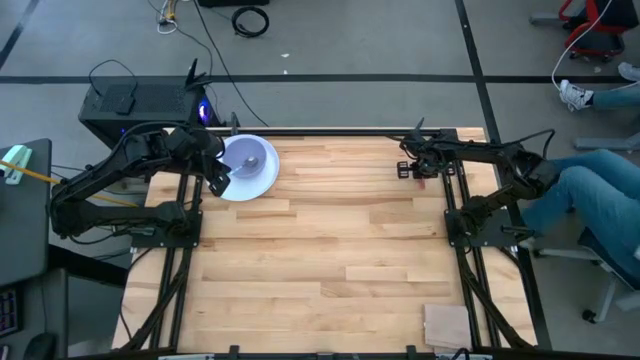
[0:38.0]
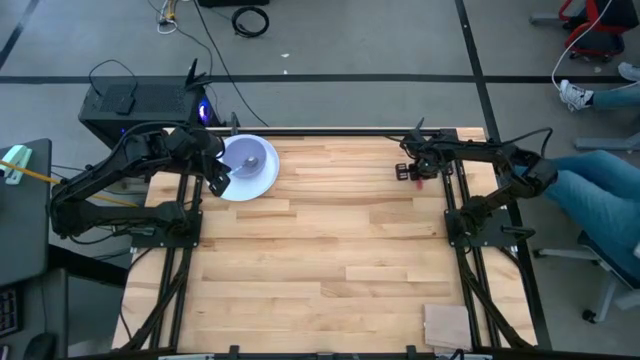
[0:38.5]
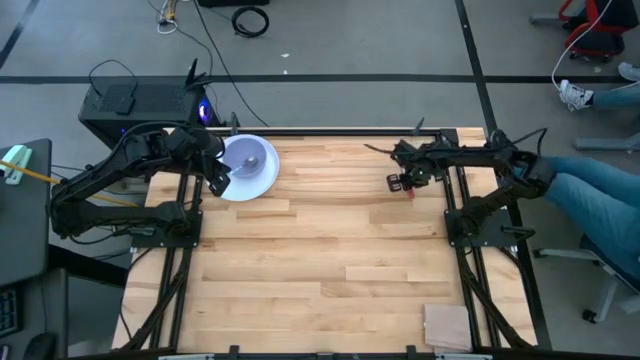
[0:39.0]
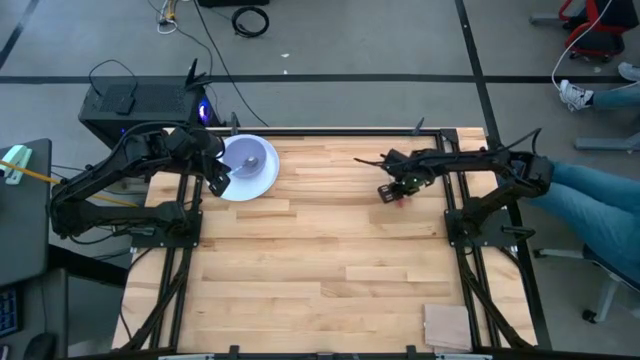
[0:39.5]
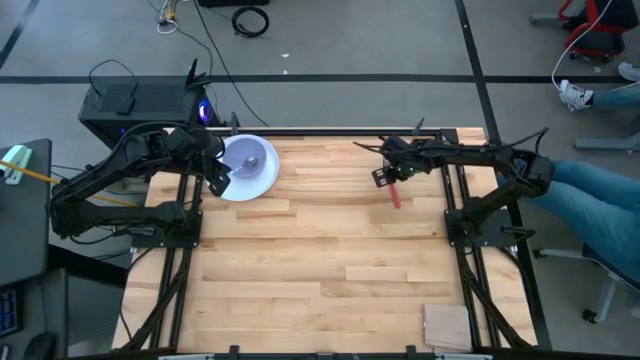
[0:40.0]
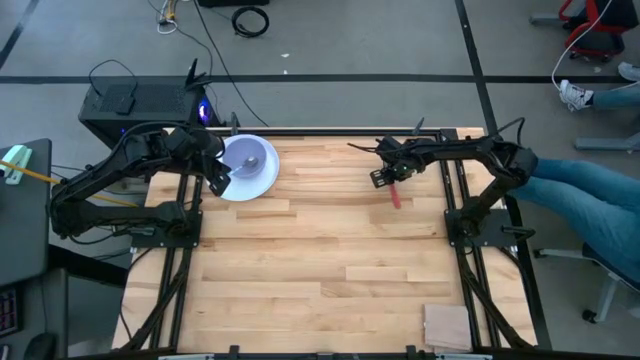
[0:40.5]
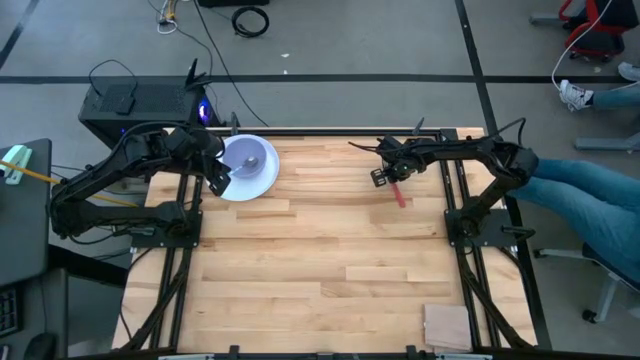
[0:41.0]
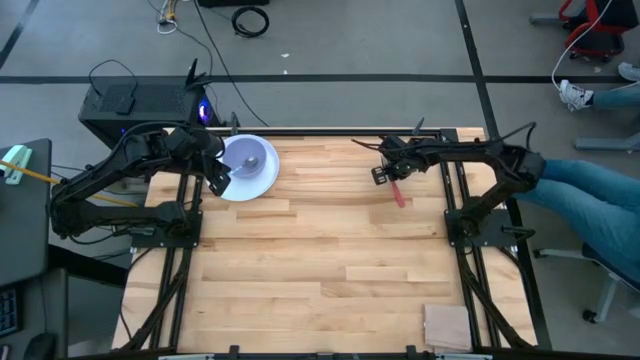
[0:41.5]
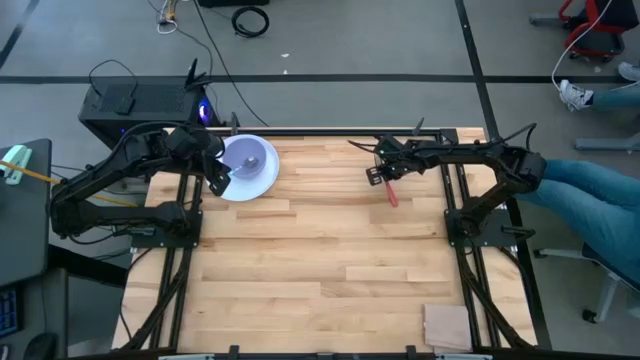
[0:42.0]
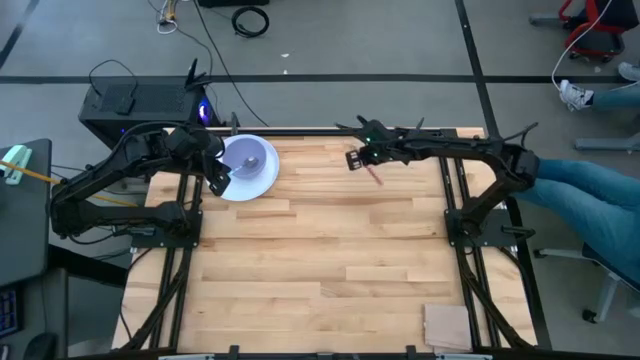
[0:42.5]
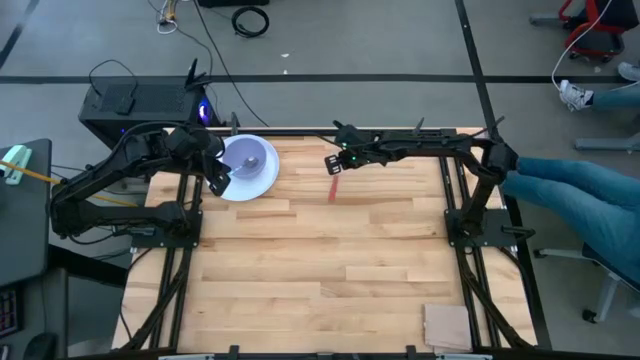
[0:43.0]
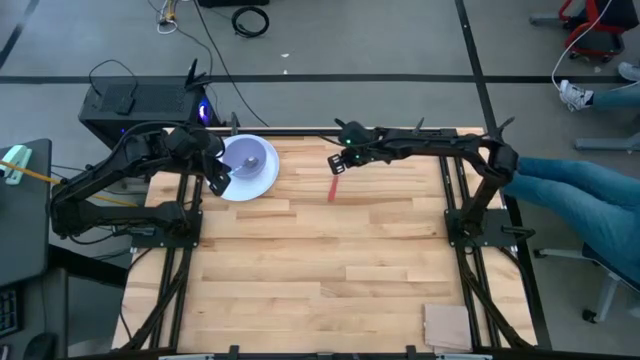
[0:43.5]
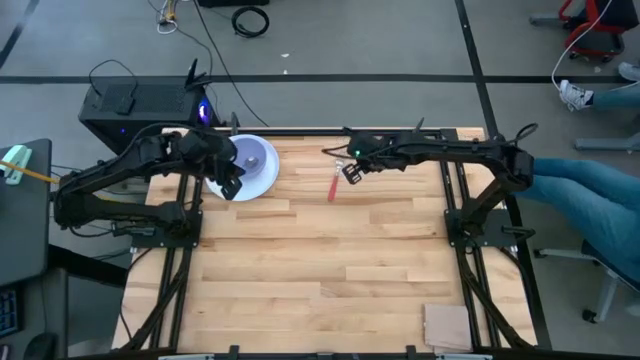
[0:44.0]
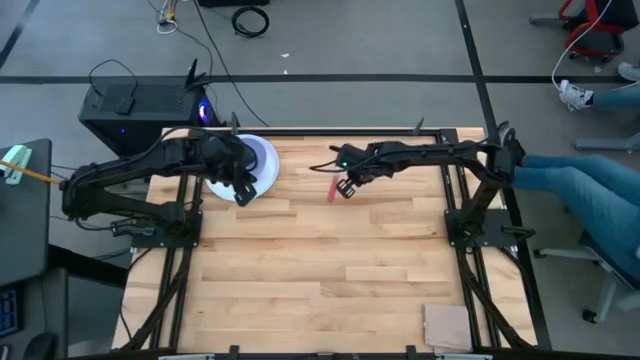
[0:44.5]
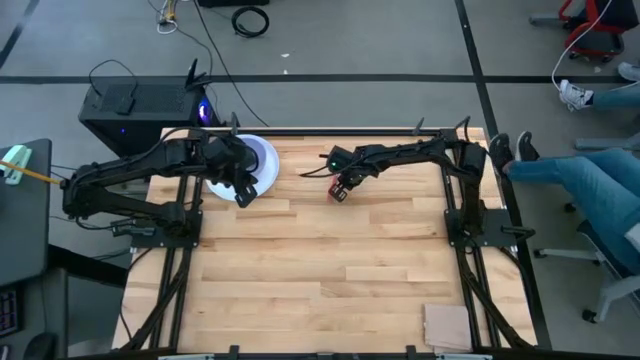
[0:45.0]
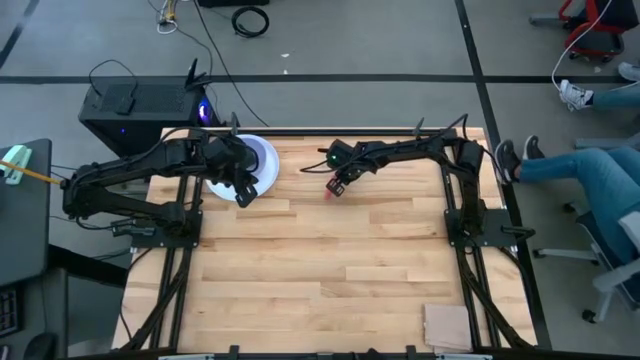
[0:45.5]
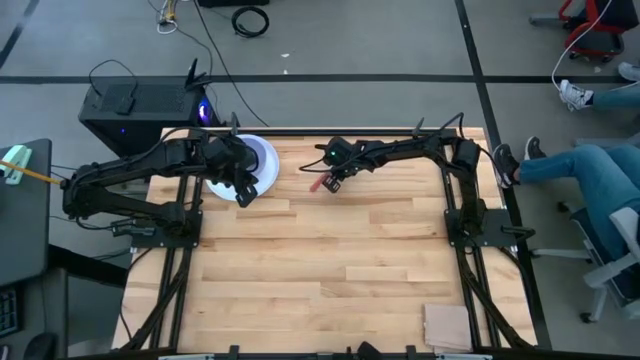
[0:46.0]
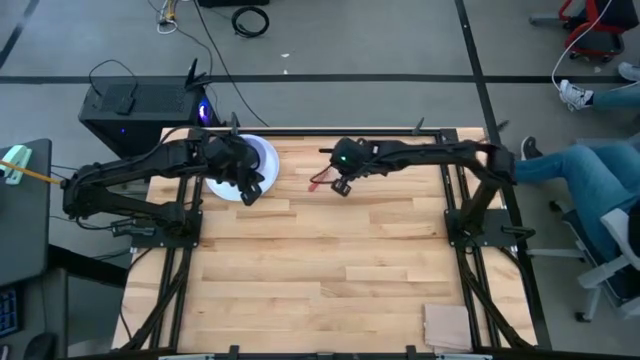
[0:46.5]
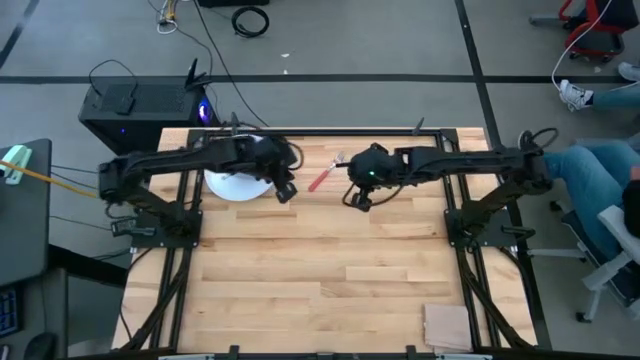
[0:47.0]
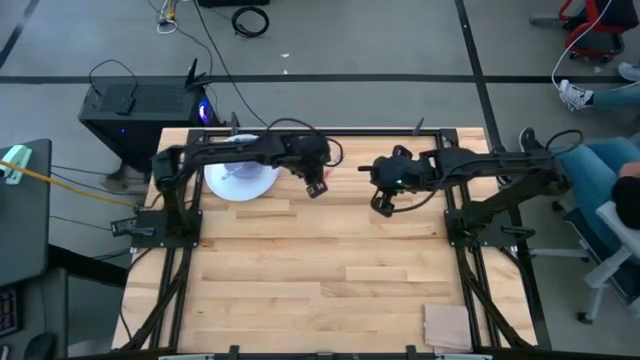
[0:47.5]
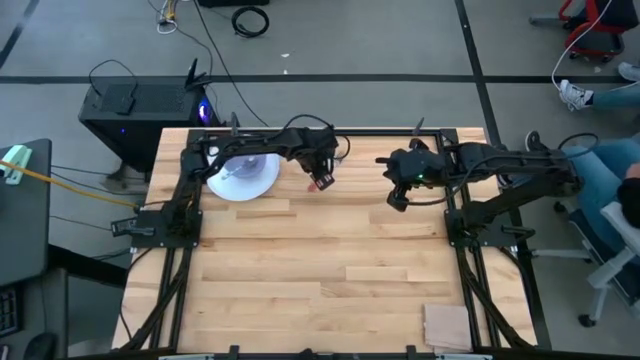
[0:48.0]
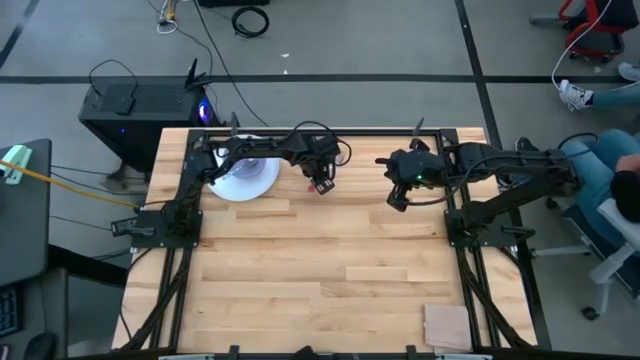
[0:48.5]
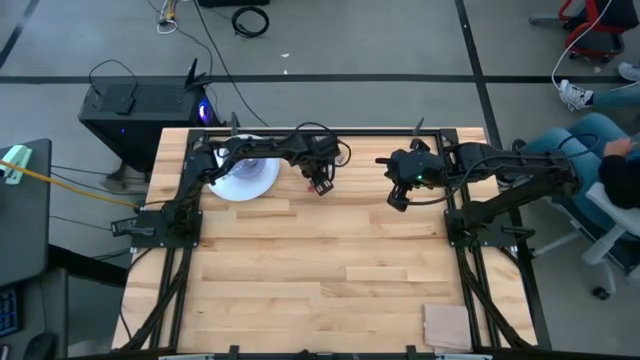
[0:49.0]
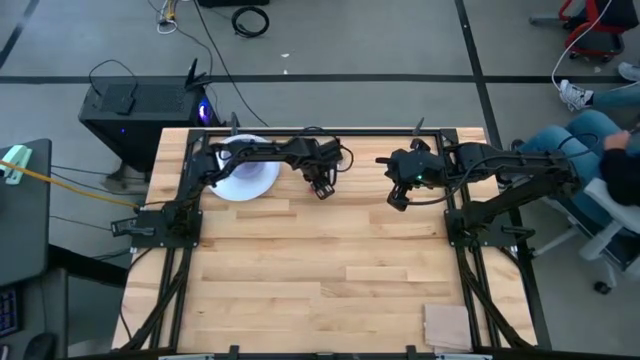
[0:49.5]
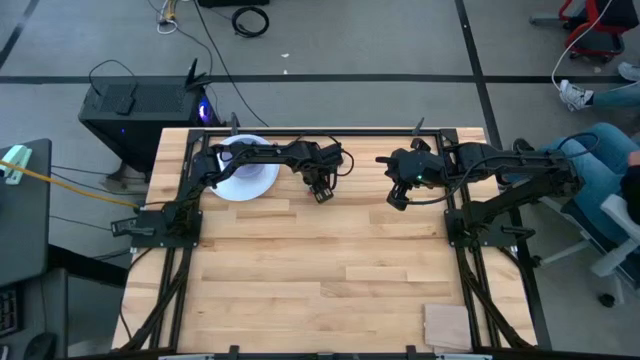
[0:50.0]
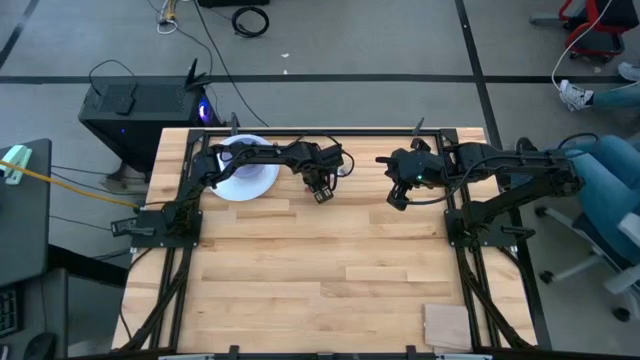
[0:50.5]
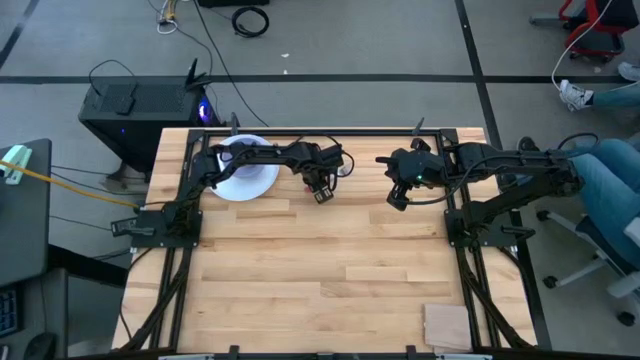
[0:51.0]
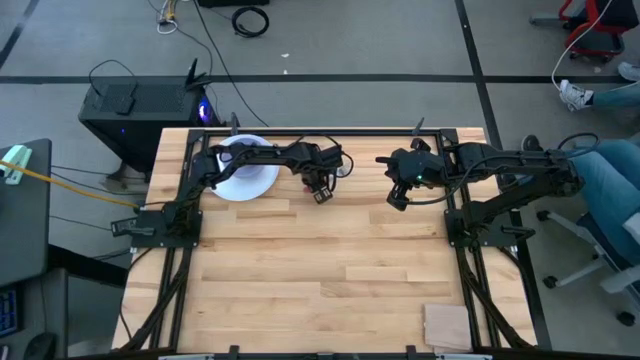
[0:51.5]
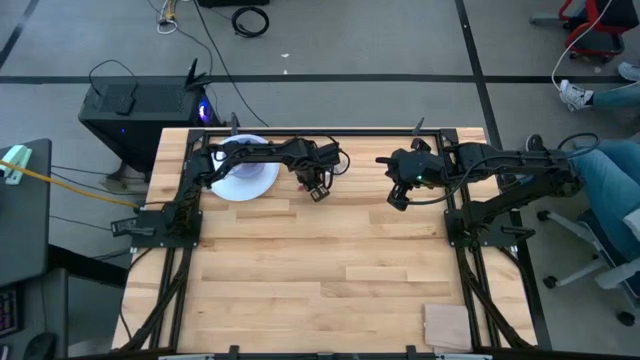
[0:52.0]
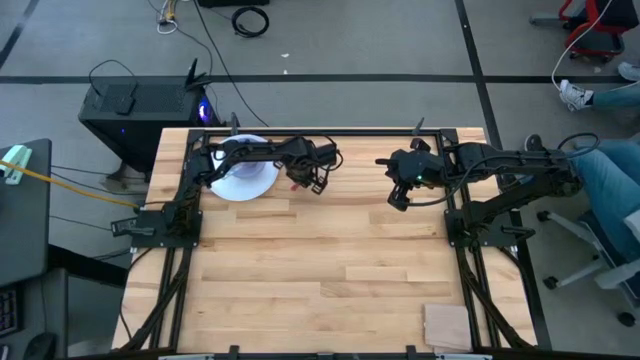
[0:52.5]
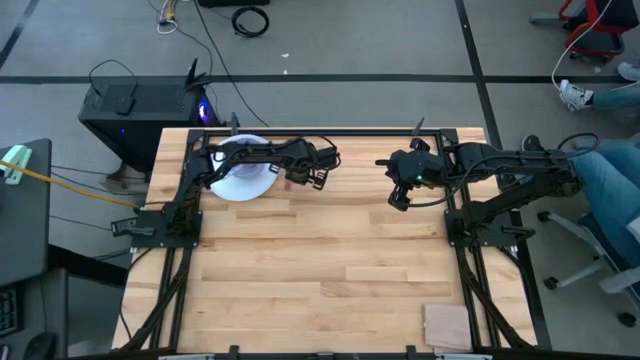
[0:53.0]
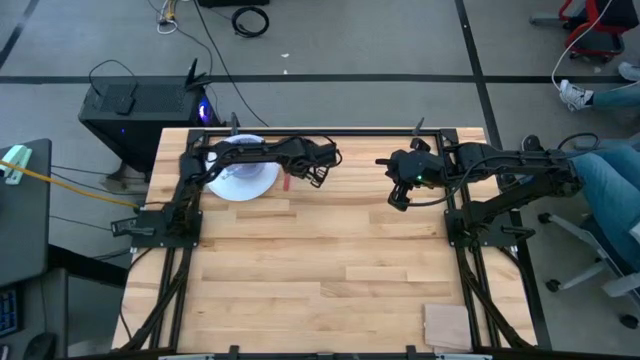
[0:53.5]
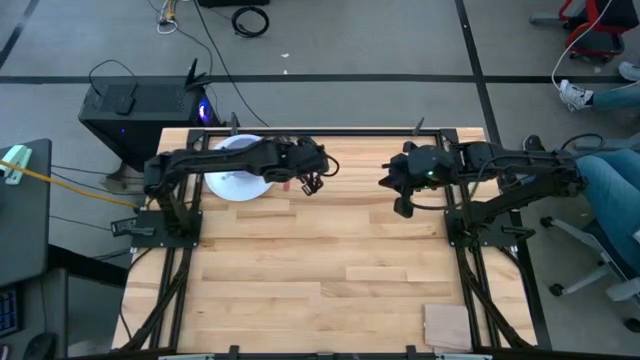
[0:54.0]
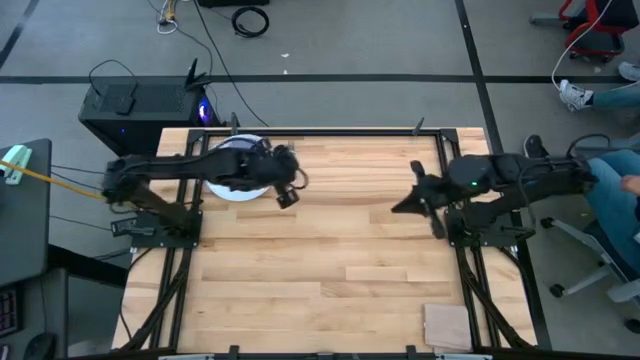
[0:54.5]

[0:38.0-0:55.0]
Task: Set table place
Place the red object next to the white plate

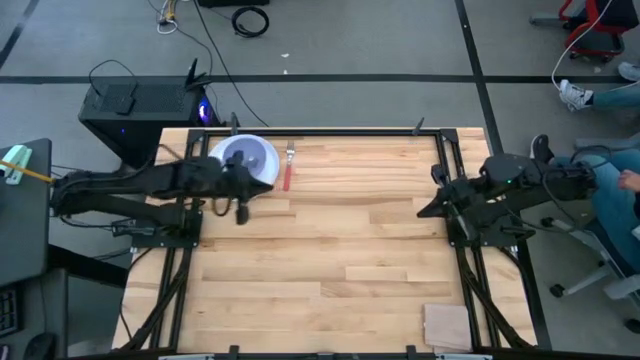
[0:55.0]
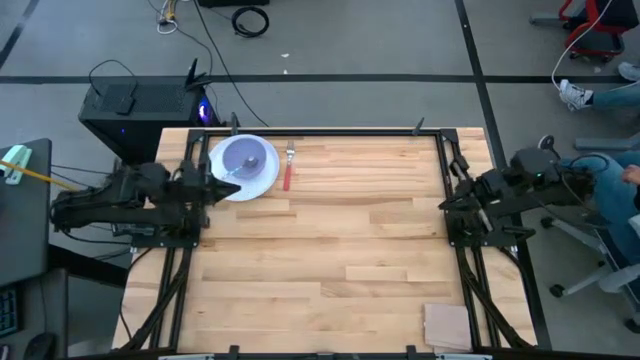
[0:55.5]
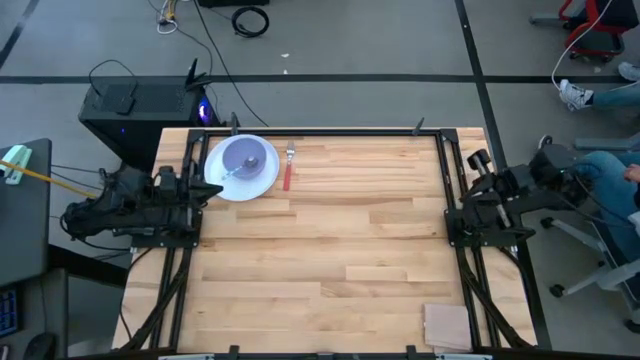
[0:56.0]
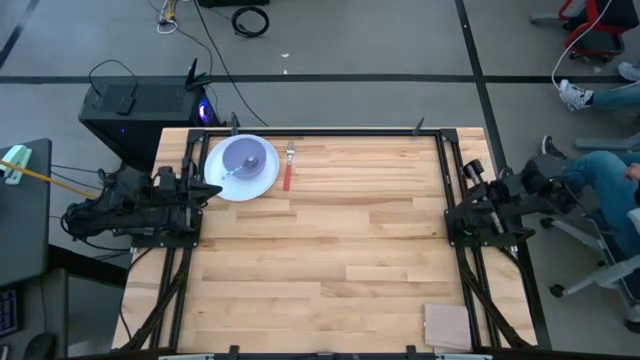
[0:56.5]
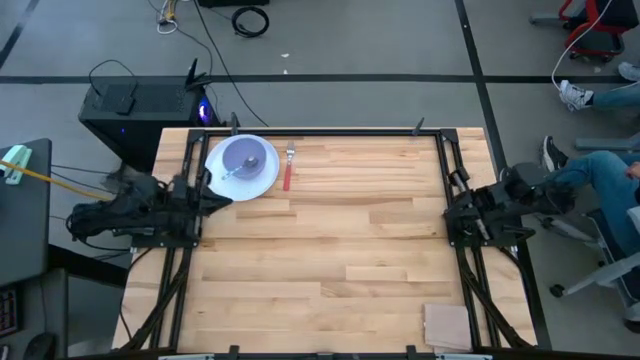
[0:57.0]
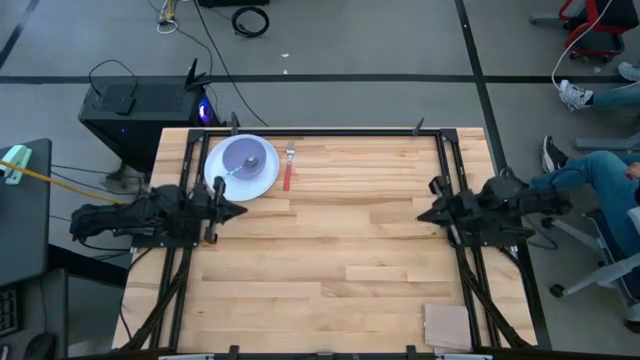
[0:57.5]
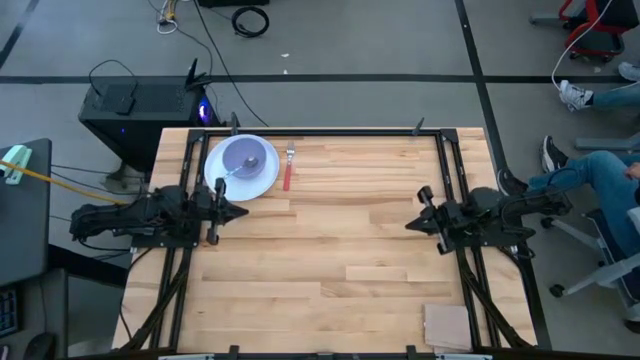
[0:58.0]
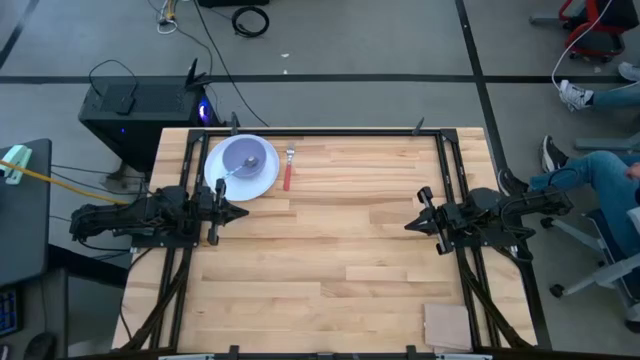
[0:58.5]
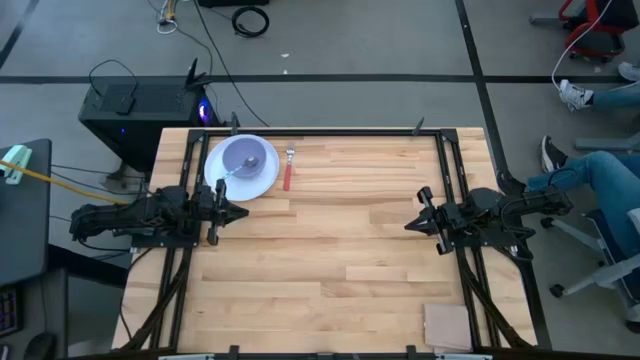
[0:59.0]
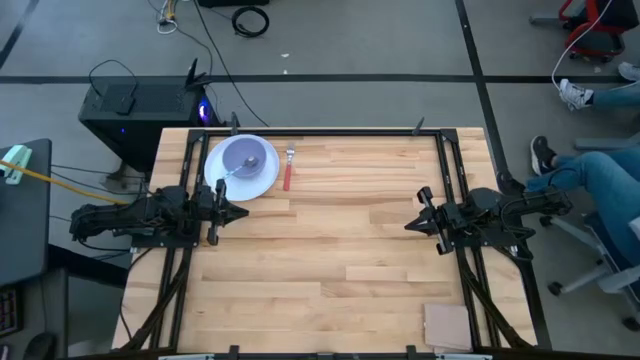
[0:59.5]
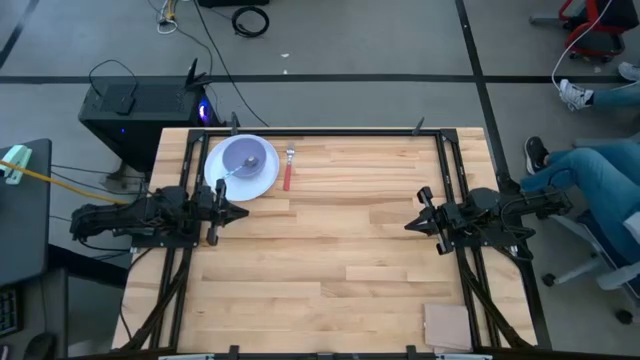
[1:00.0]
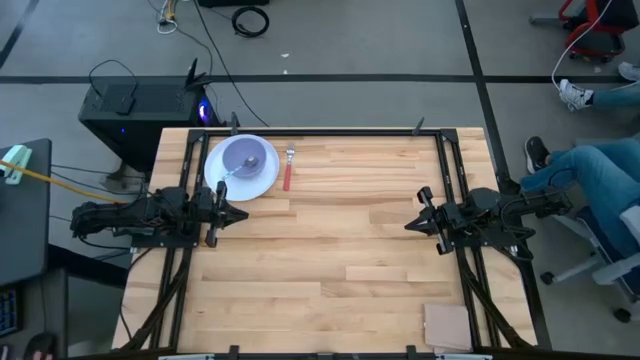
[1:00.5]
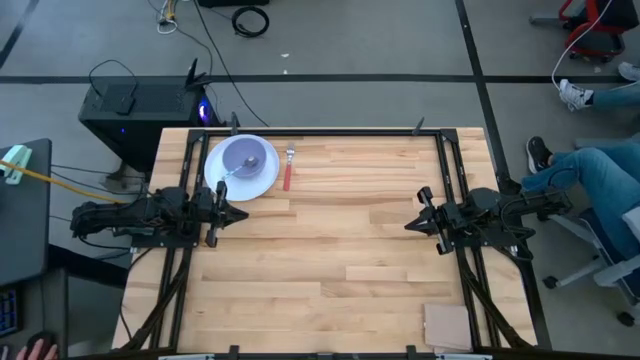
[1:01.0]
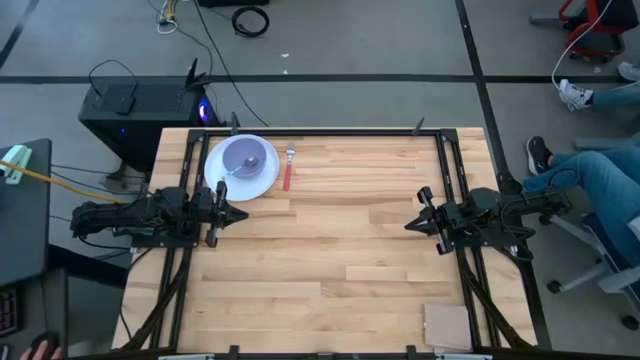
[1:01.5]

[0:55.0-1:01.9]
Return to Home Position
